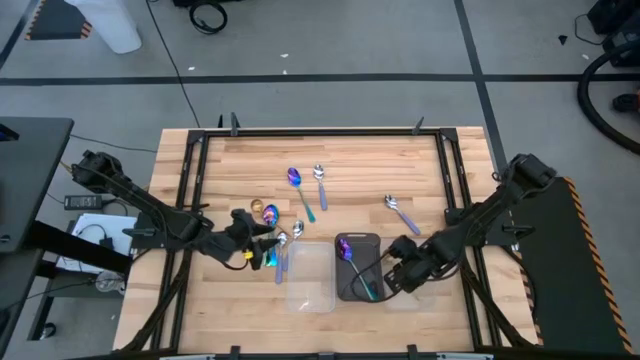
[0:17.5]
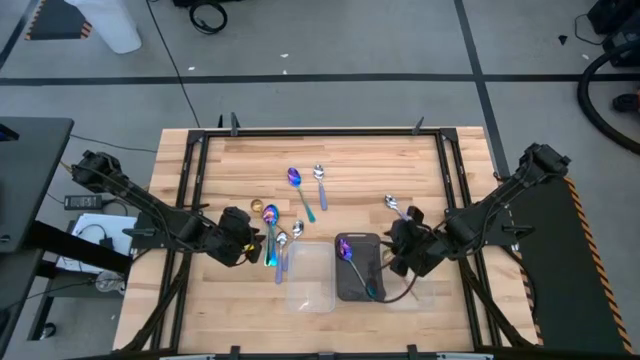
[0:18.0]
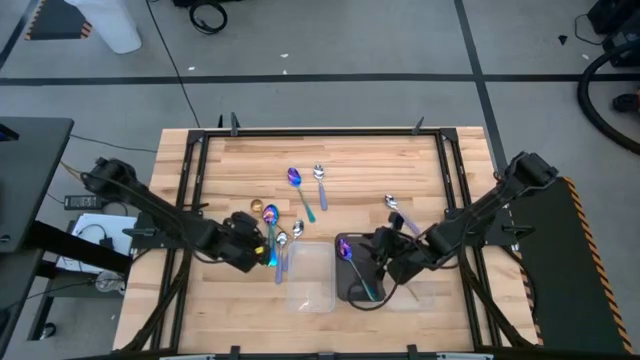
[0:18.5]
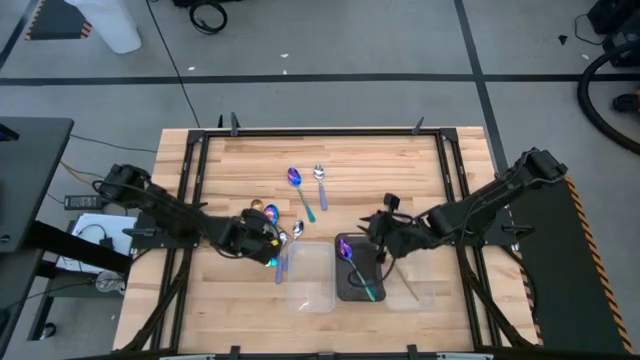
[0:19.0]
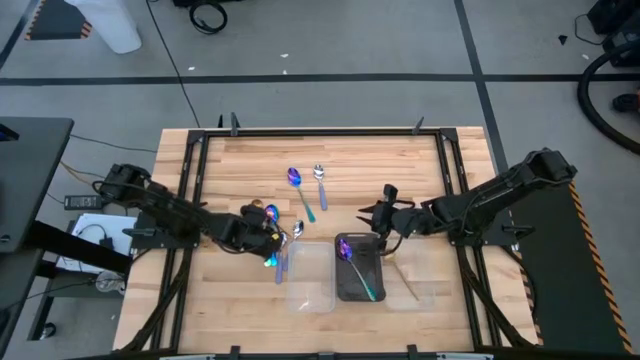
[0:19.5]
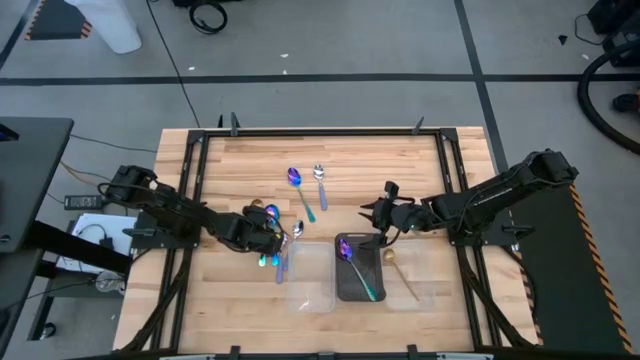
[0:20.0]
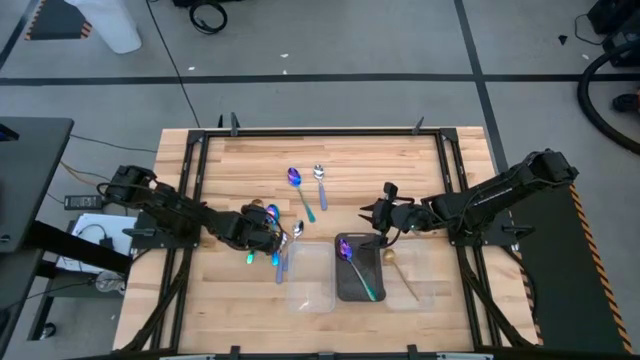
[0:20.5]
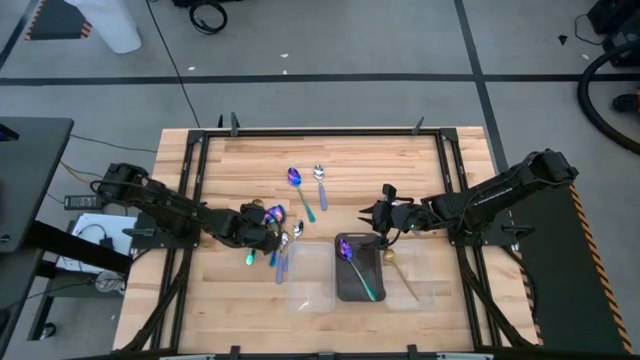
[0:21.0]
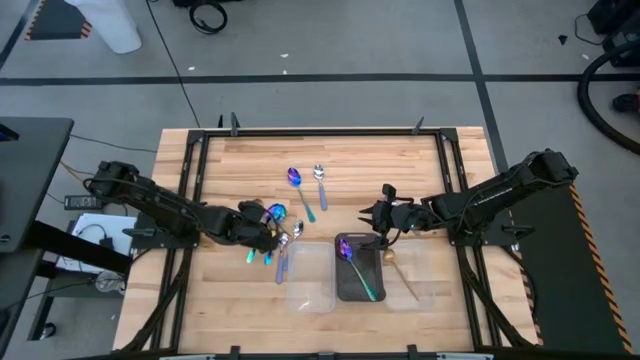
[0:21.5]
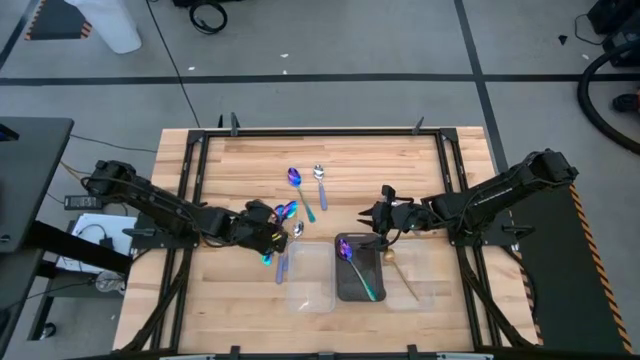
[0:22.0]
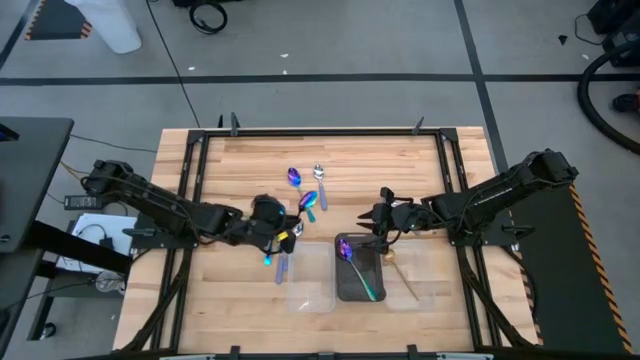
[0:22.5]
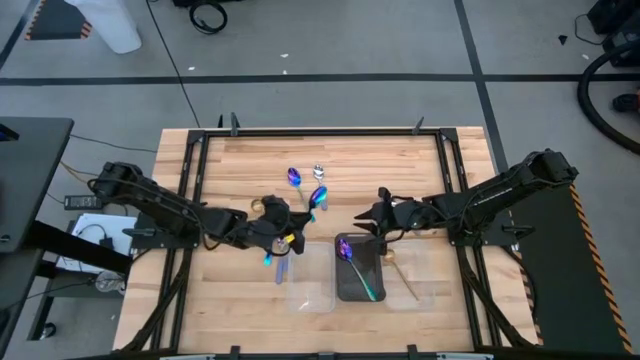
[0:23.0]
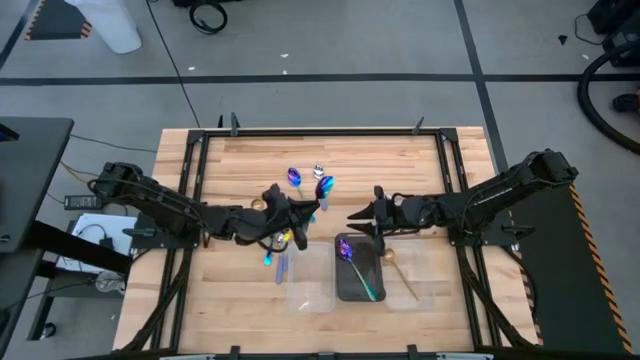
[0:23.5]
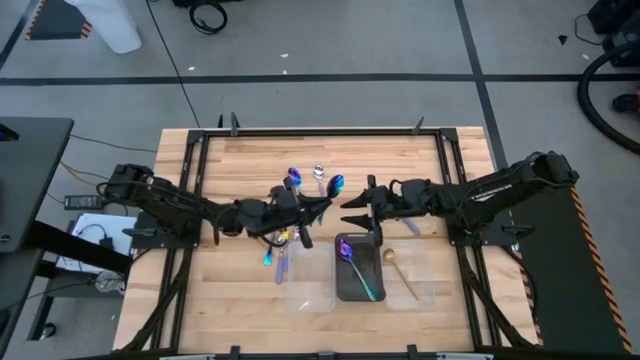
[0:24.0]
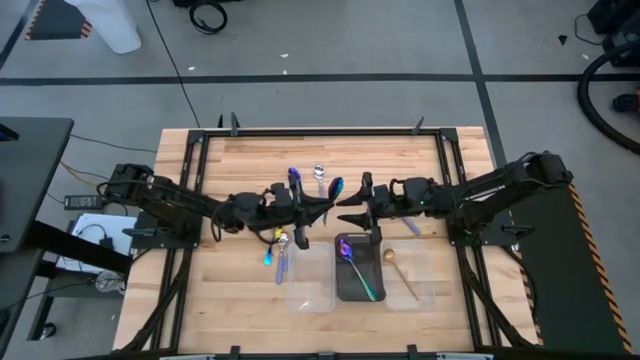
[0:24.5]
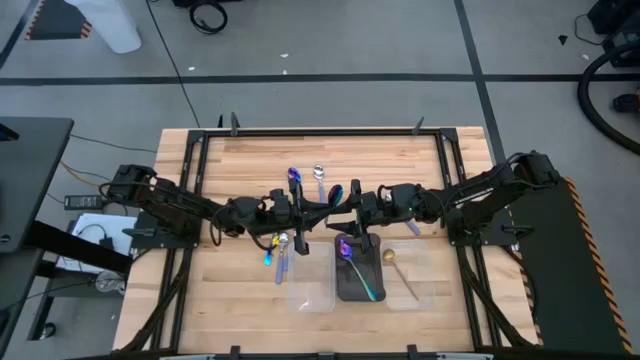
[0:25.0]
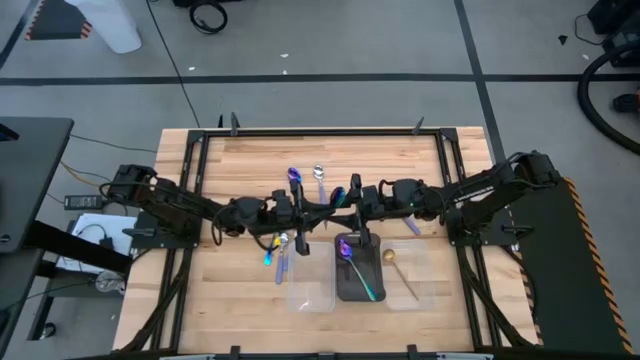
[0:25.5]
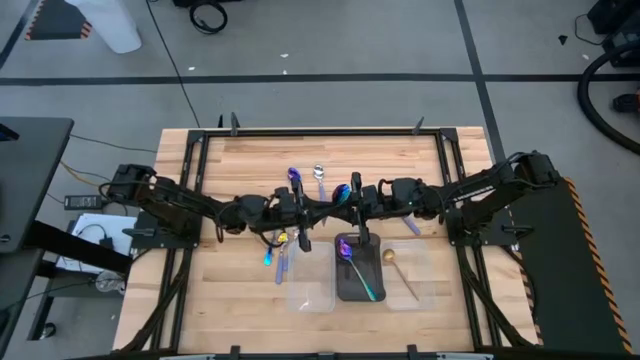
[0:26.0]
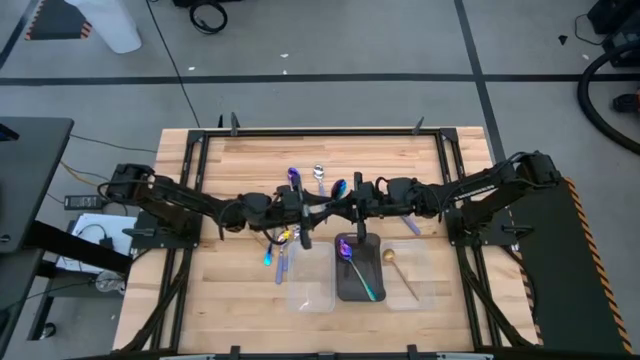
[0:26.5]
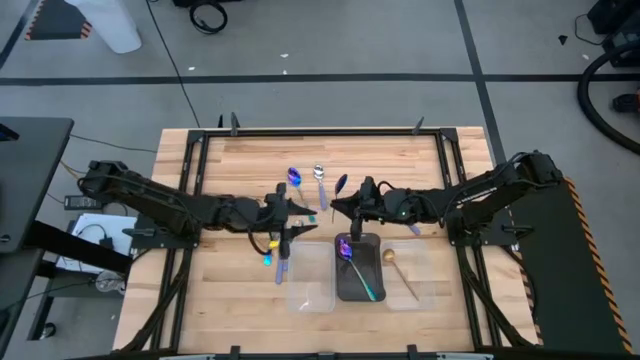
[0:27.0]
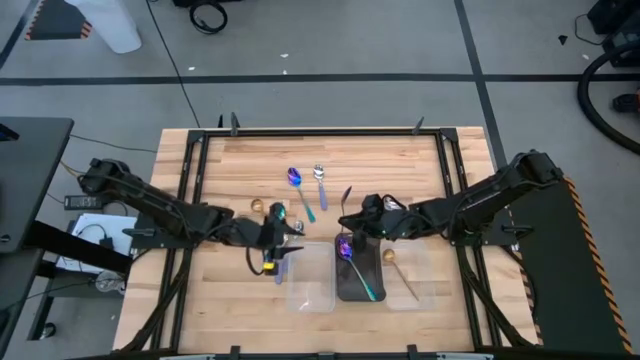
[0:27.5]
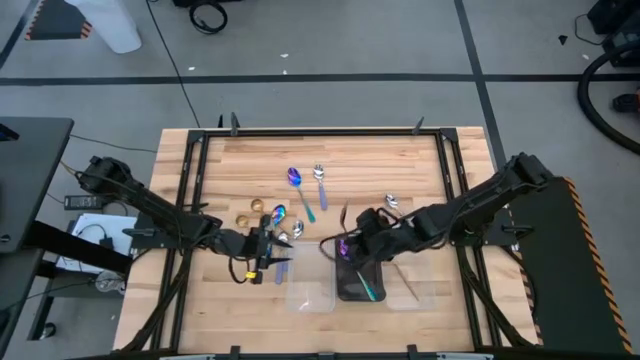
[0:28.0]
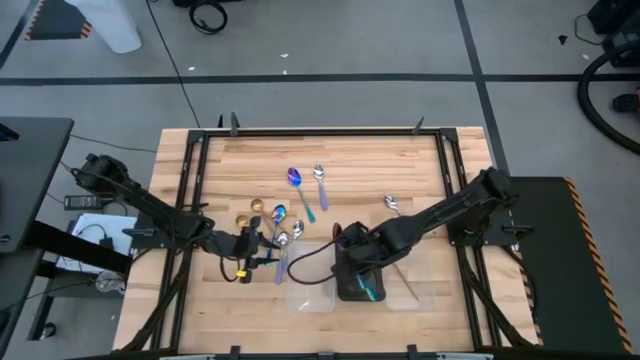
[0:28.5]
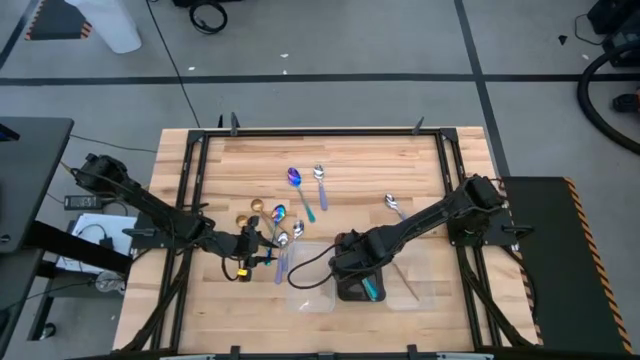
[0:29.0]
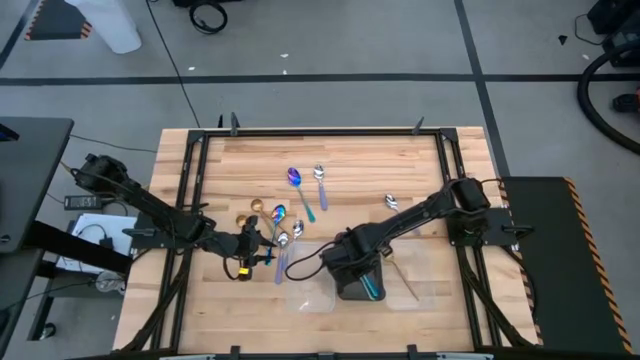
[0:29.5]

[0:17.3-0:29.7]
Task: Sort silverware by color (type)
Put the blue spoon into the black bin

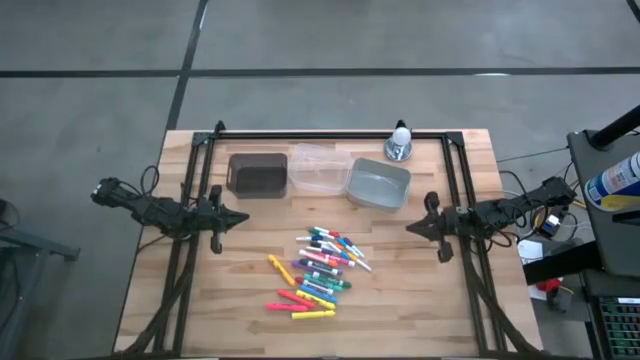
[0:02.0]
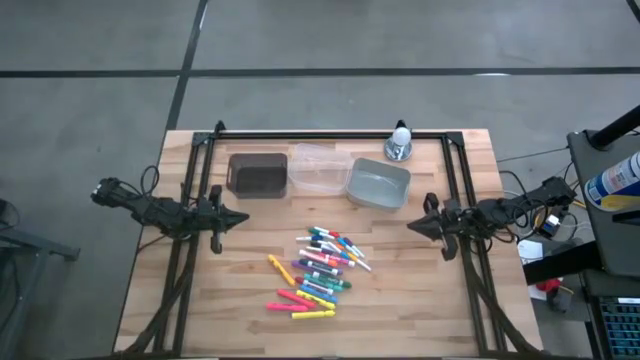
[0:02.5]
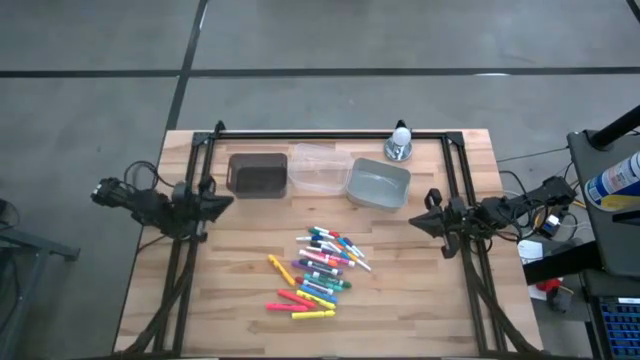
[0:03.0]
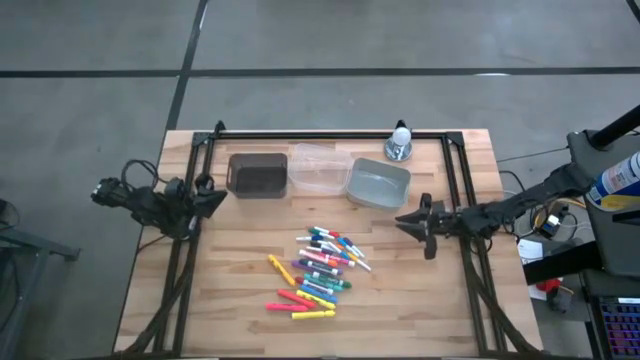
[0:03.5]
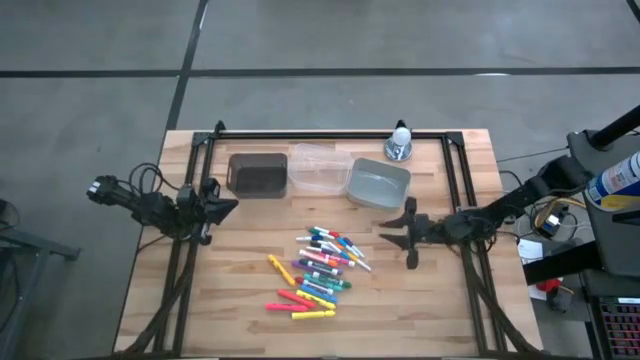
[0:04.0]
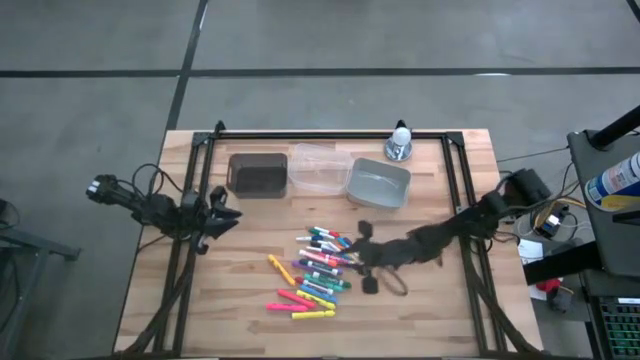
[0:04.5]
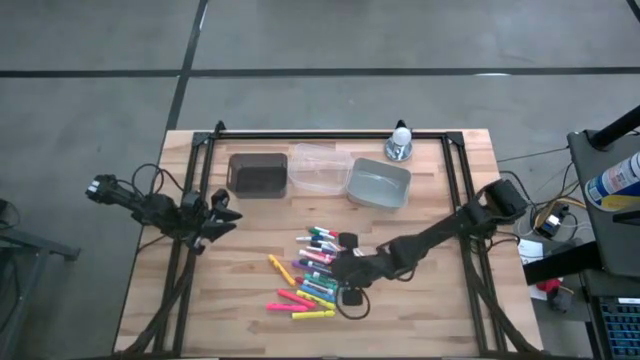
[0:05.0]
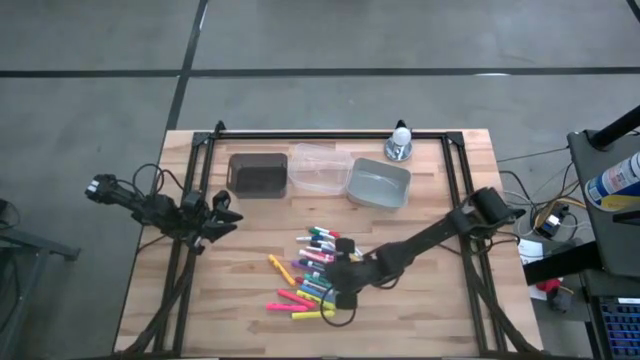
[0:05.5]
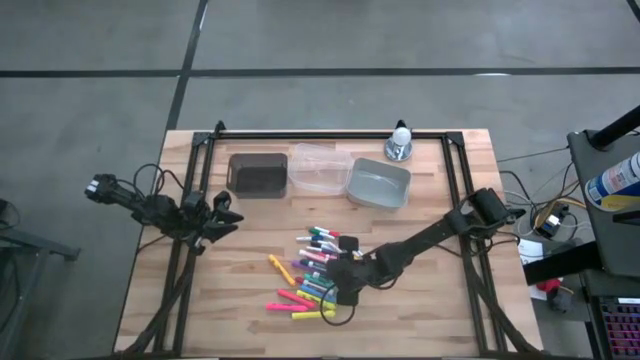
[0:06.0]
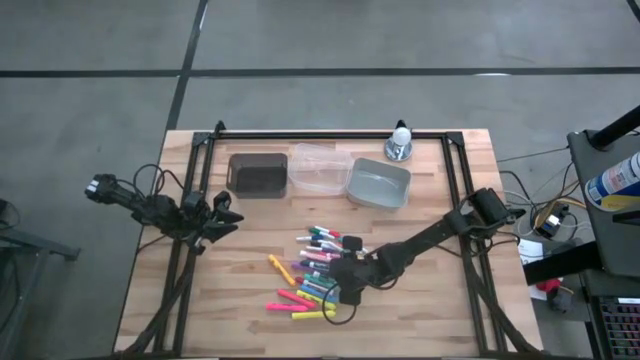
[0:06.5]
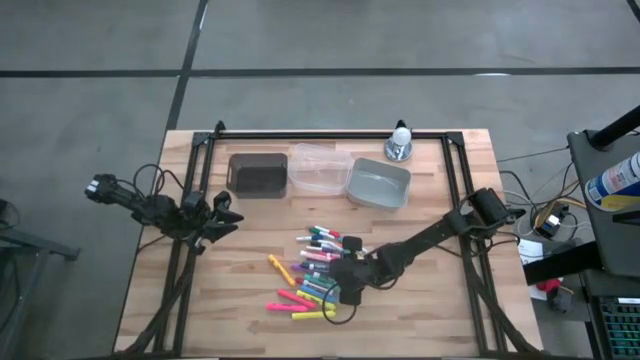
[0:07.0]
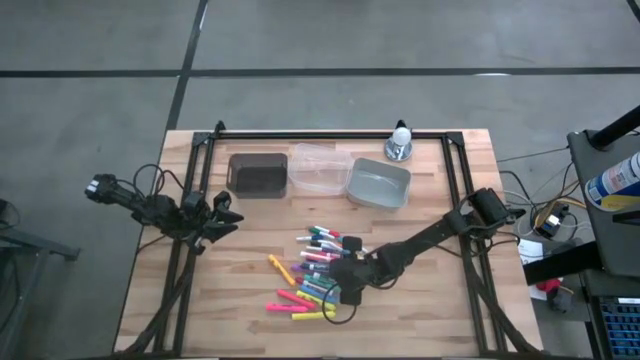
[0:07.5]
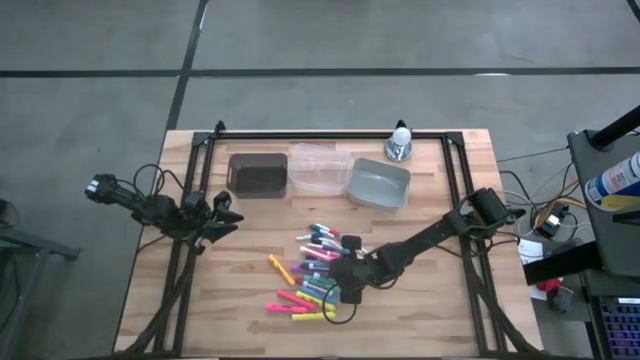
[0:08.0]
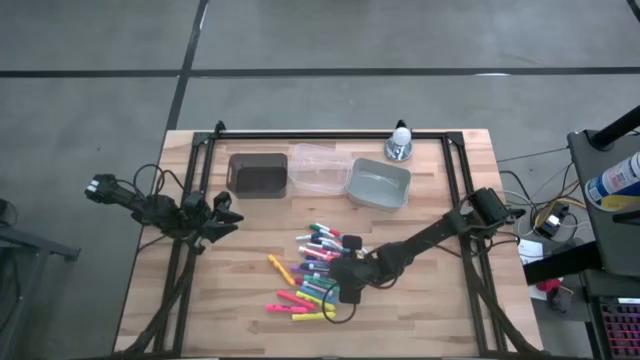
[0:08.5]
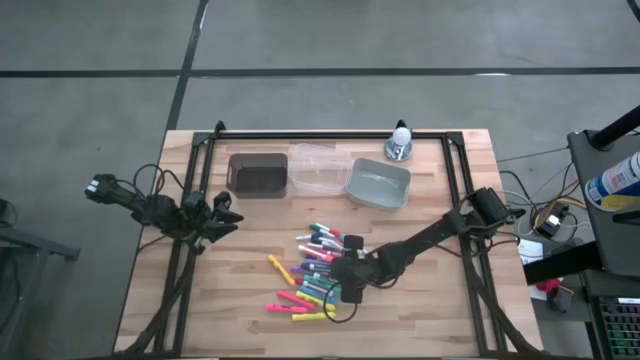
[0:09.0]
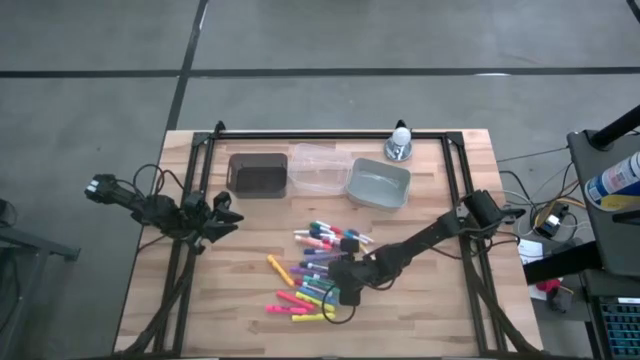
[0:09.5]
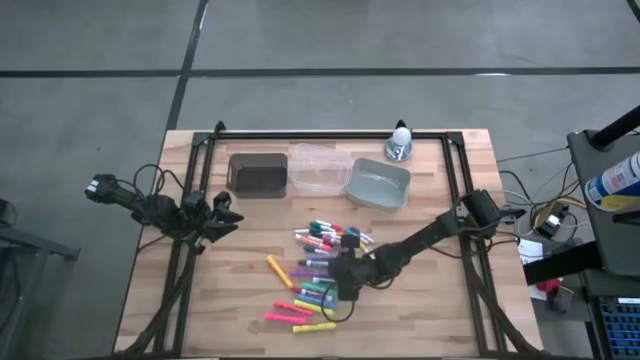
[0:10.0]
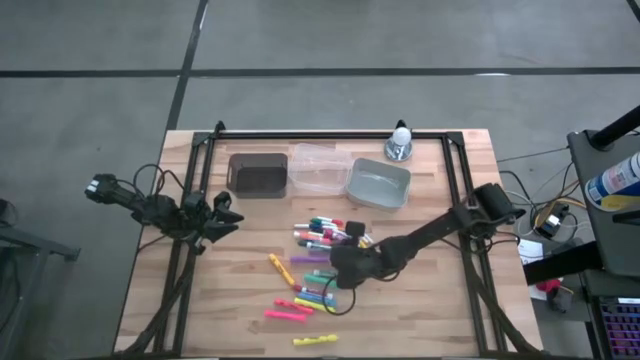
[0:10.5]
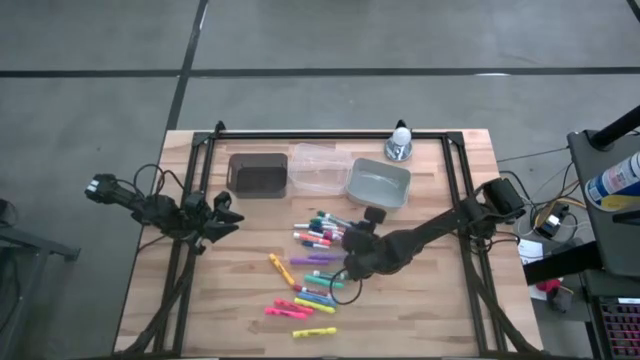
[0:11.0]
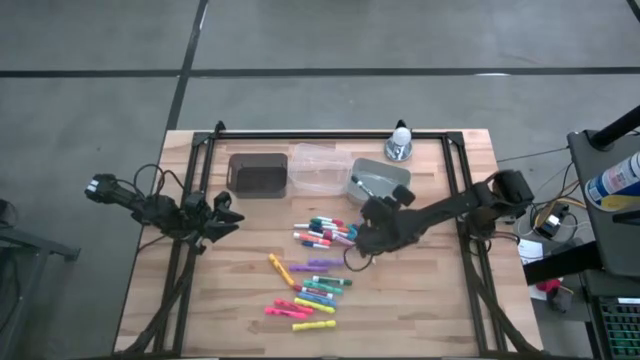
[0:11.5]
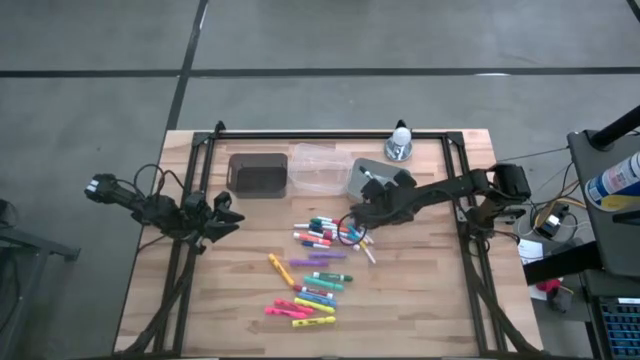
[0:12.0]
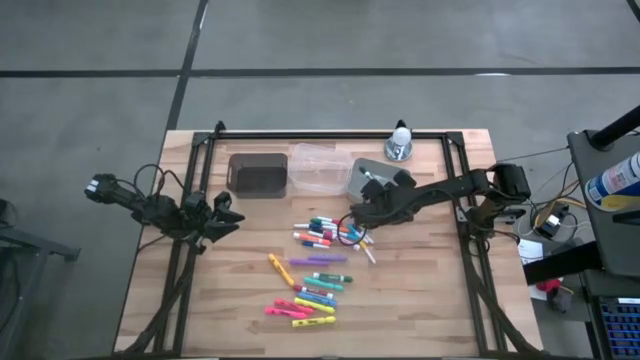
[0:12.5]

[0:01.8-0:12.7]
Task: Pick & Place Markers
Put the green dry erase marker into the gray bin
